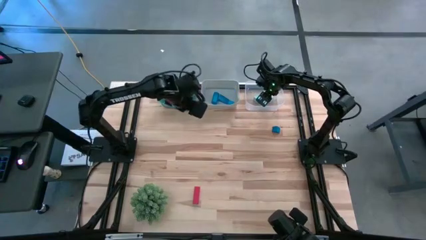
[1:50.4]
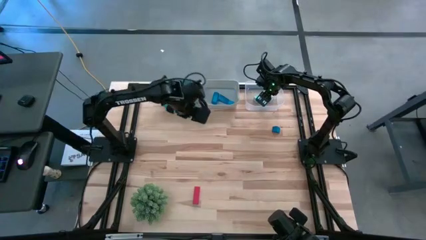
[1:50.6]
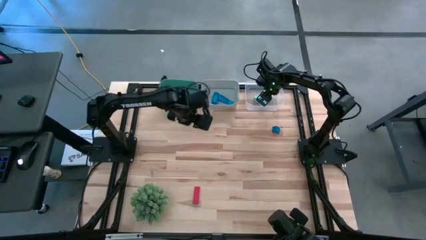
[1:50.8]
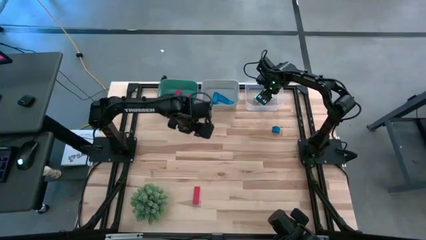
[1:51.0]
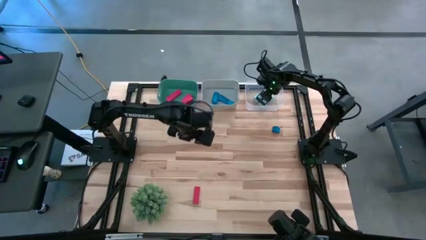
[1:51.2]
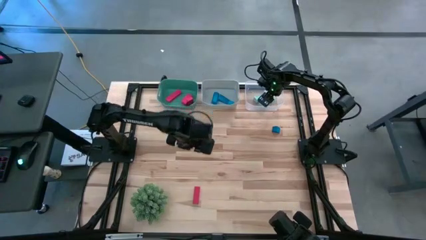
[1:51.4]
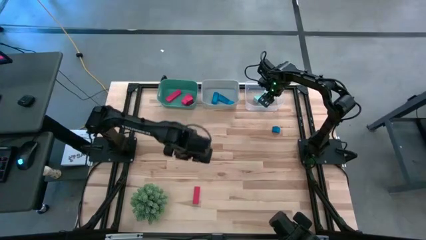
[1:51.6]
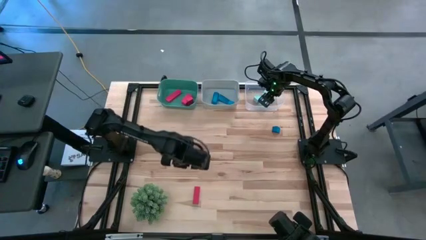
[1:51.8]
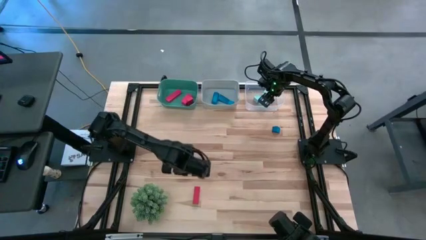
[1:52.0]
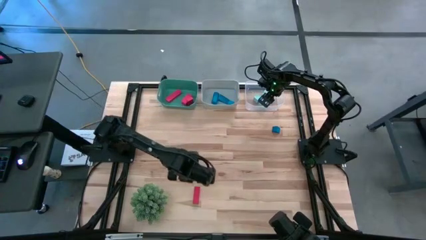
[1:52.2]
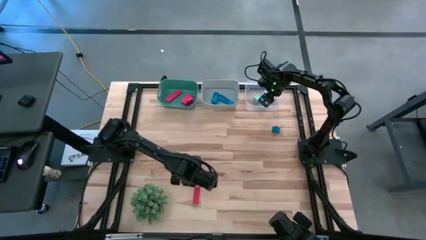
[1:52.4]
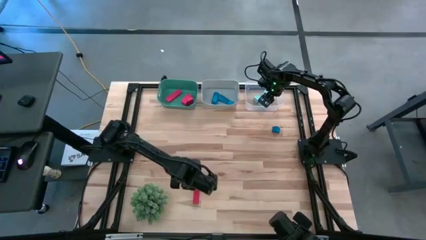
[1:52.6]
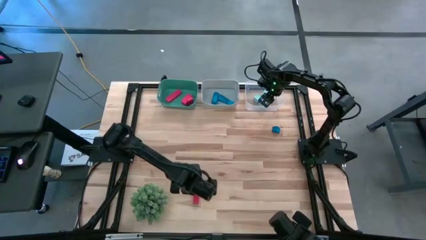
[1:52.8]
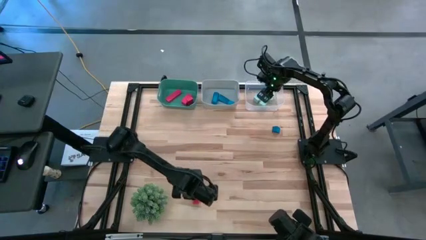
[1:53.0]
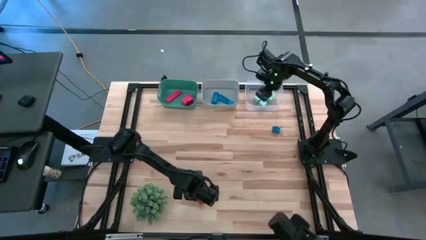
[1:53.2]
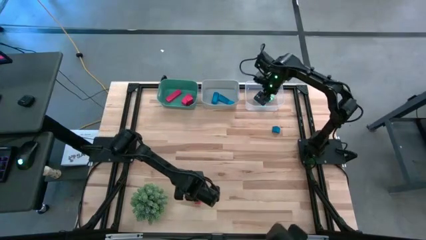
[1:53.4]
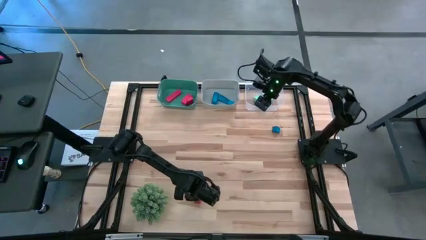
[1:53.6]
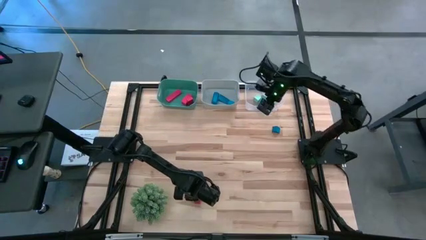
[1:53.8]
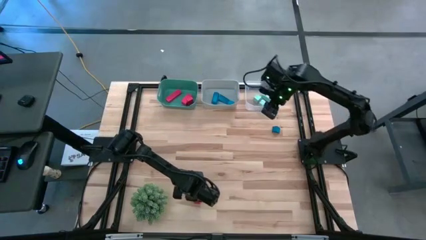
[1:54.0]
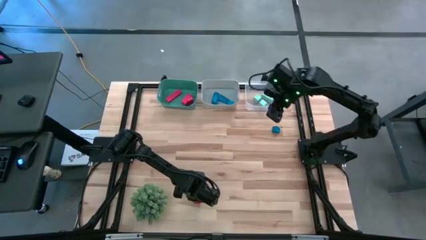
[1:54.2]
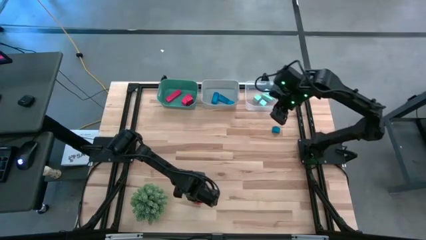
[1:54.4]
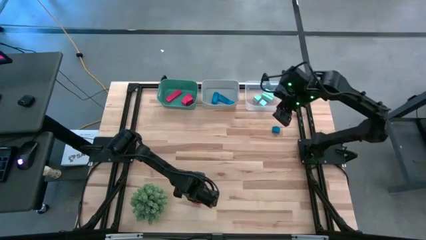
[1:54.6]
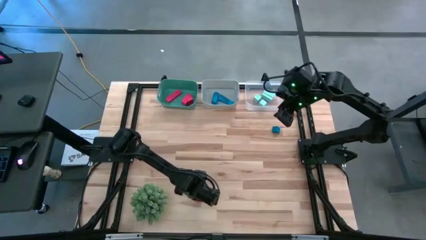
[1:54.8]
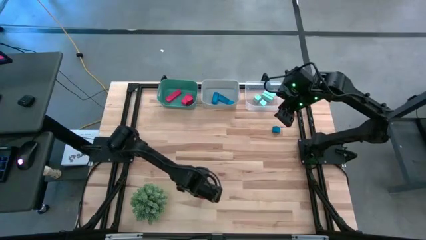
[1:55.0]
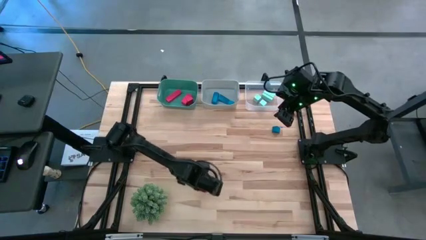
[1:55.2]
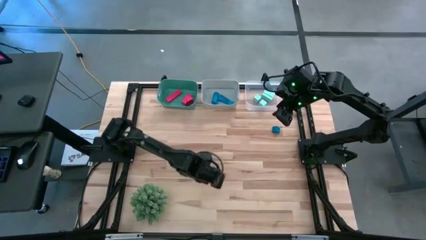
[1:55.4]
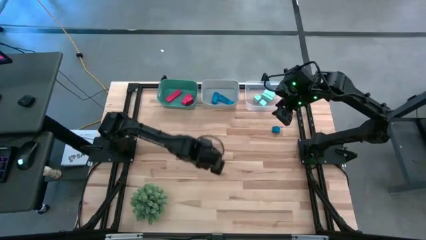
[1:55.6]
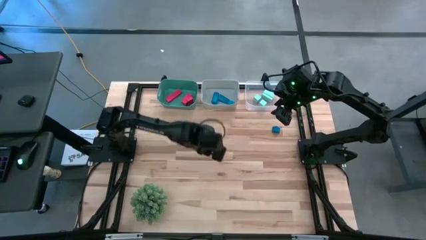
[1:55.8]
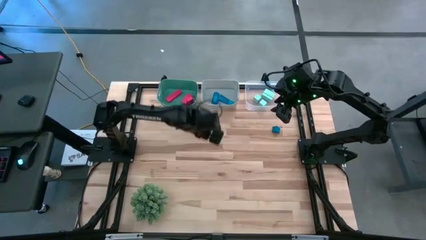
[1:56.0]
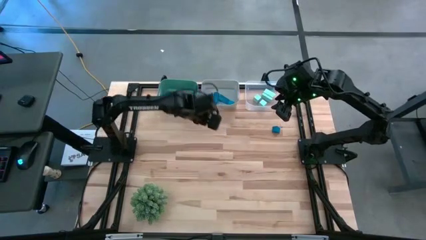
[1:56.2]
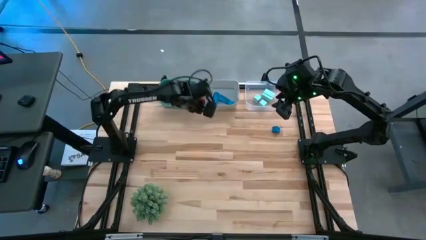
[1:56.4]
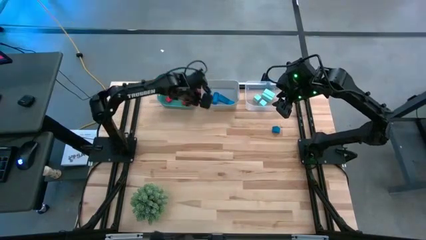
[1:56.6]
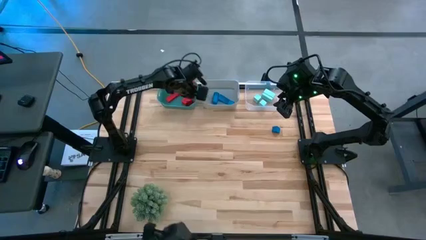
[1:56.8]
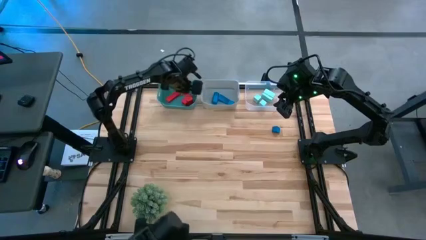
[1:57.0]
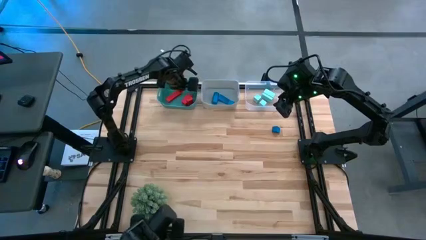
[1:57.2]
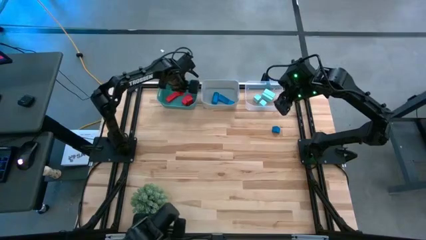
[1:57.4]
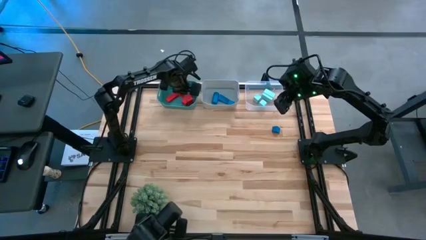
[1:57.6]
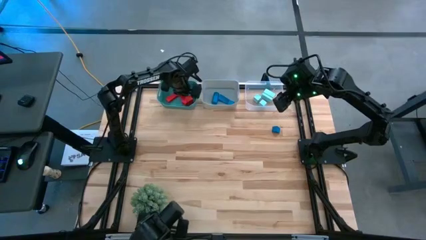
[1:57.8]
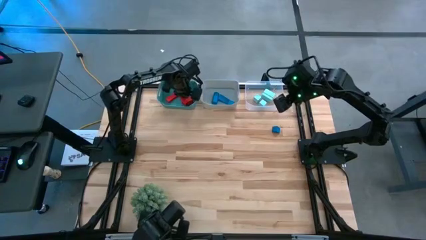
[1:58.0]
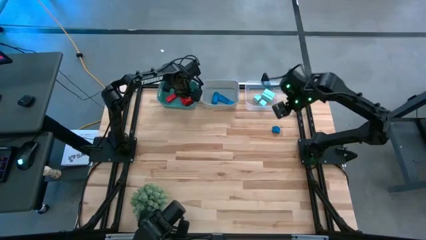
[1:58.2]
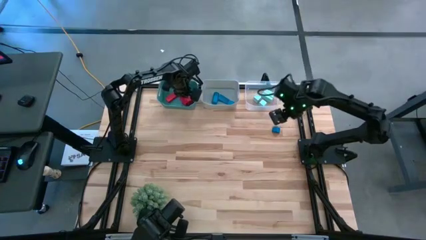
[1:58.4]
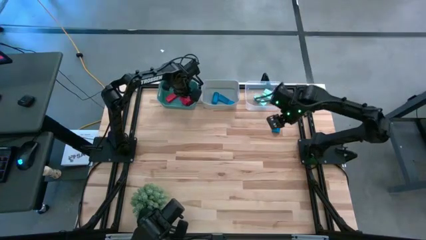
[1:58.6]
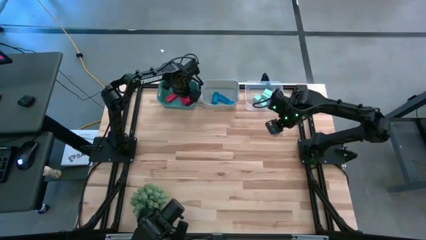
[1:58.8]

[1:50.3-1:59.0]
Task: Sort & place blocks by color
Put the red block into the green bin

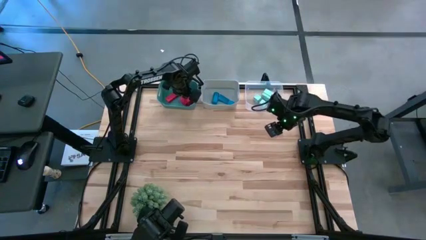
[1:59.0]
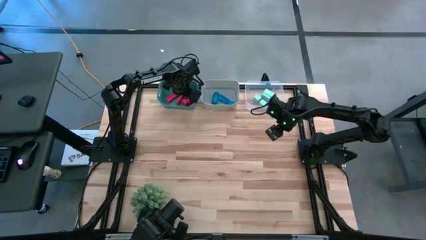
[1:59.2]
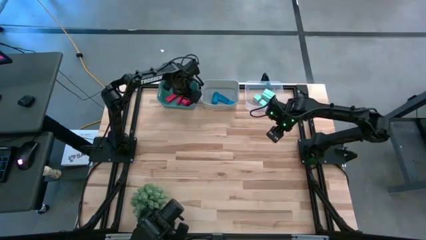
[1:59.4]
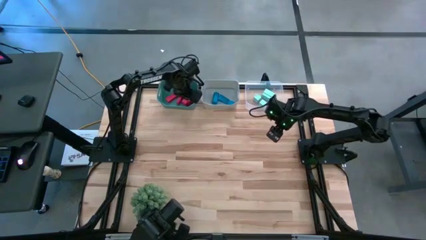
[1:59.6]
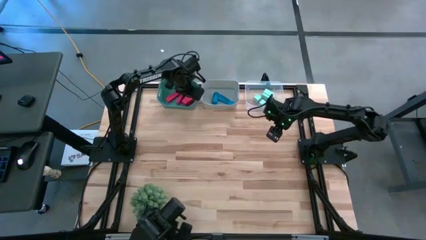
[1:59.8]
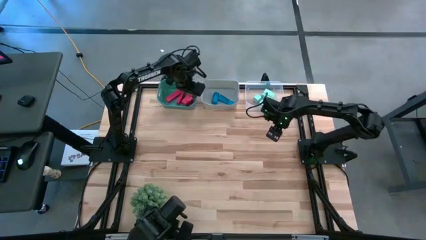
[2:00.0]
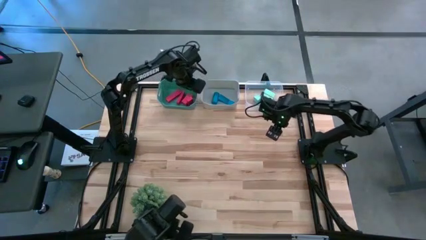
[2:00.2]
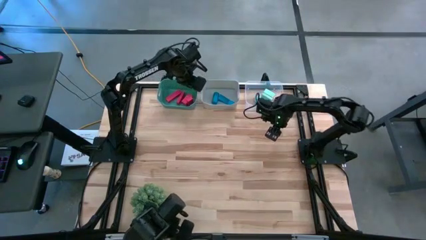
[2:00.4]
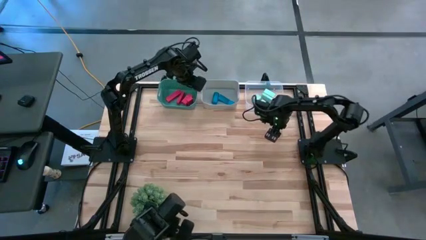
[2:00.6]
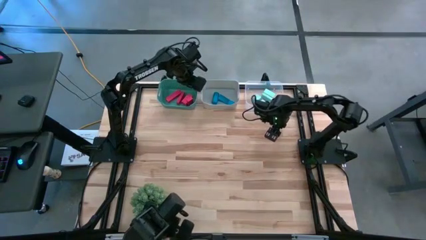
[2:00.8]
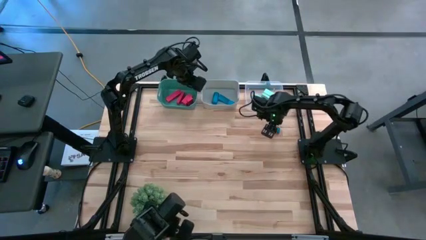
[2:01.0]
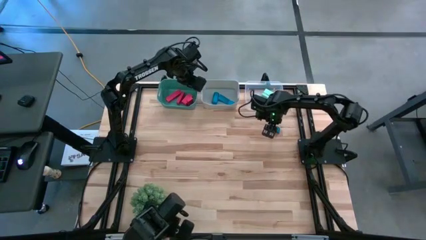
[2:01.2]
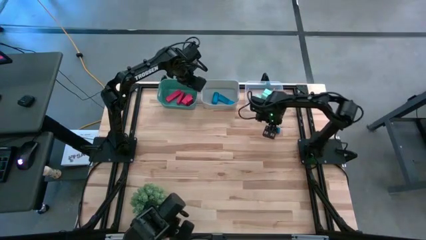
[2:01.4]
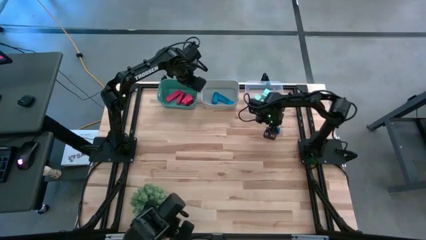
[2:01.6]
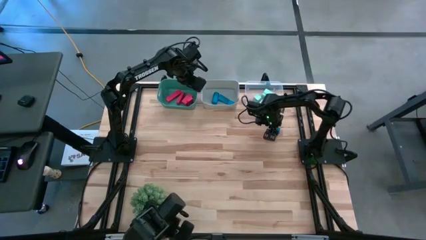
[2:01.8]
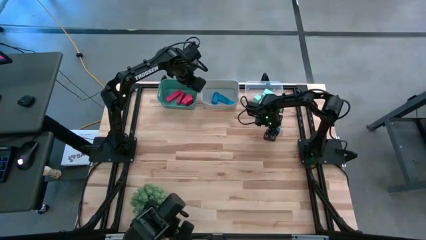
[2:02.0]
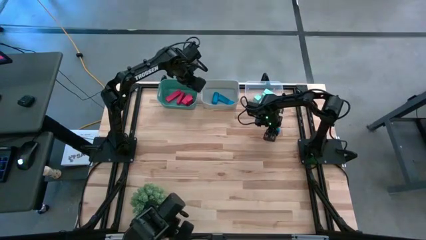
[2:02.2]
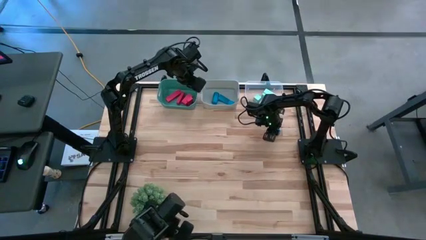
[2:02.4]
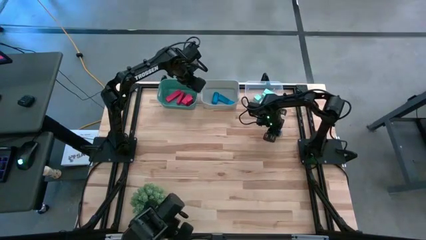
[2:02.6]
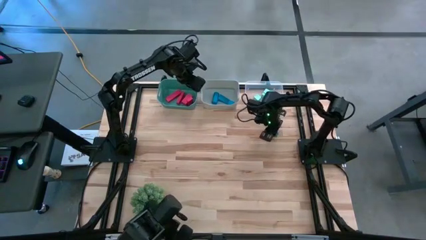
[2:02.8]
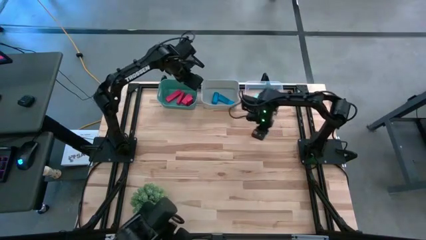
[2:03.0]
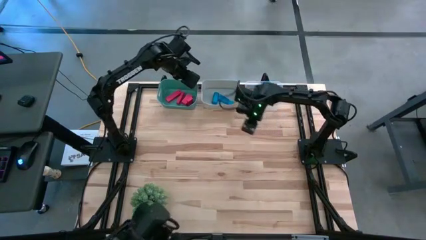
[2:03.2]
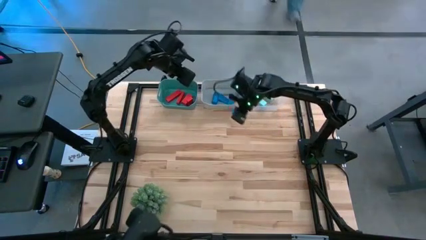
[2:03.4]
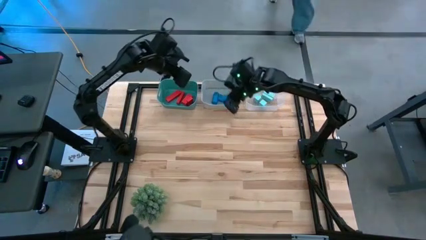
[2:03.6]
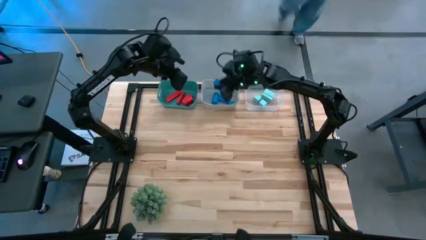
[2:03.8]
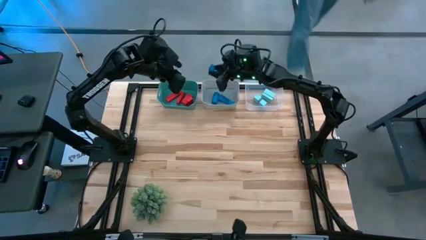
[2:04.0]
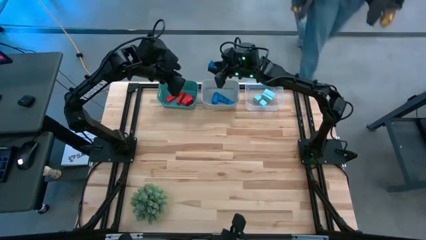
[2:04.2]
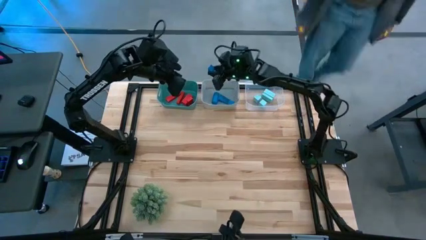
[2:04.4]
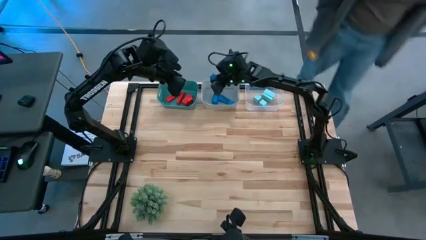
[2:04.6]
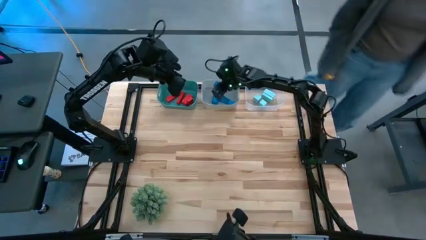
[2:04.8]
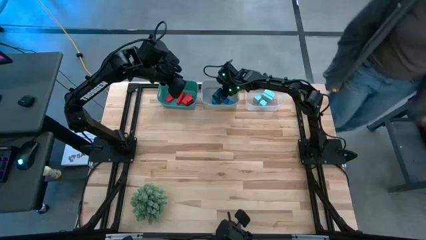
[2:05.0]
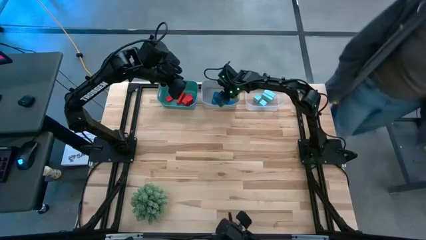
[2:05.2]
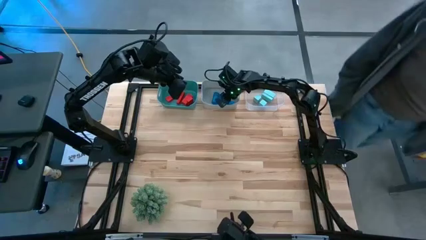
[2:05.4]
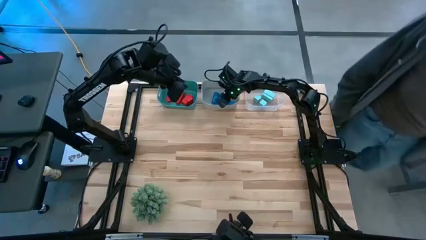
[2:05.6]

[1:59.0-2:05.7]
Put the blue block into the gray bin
